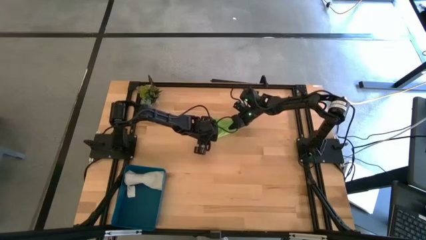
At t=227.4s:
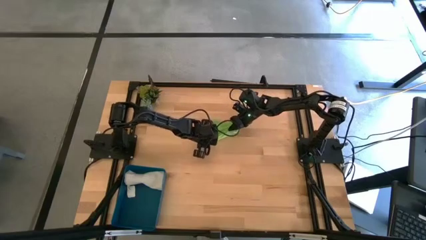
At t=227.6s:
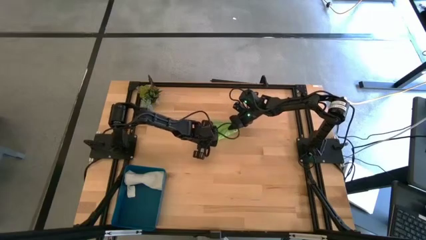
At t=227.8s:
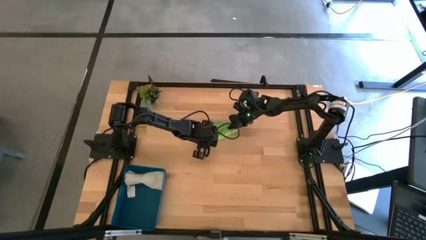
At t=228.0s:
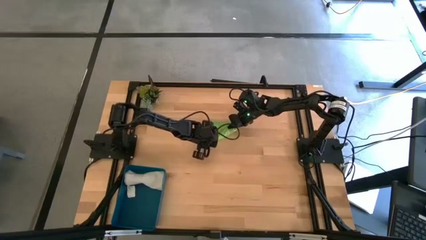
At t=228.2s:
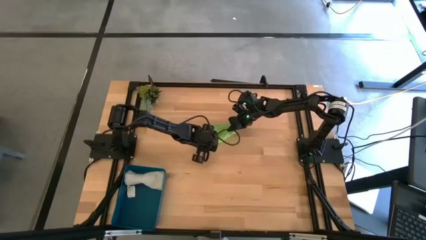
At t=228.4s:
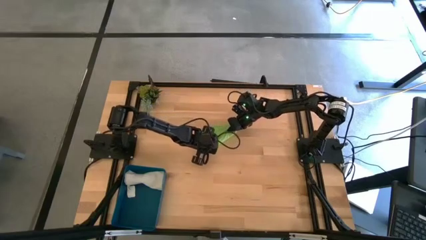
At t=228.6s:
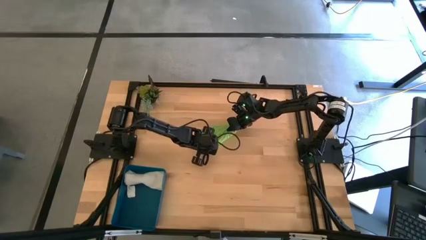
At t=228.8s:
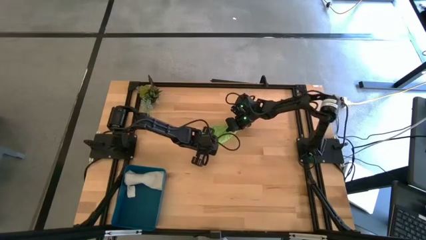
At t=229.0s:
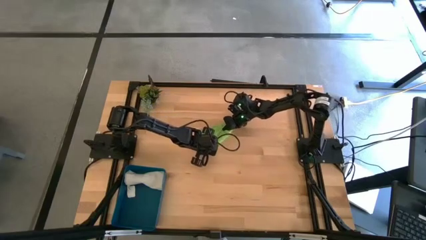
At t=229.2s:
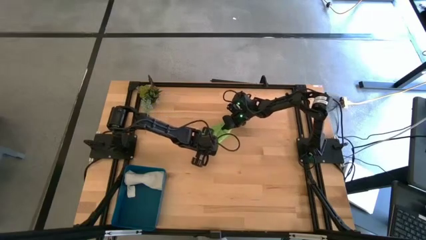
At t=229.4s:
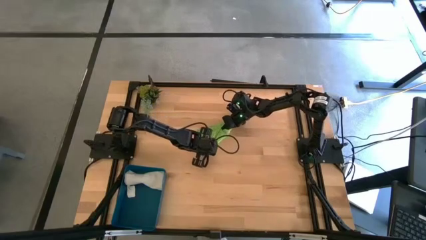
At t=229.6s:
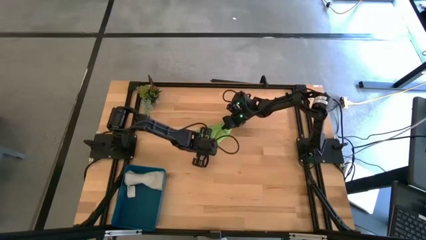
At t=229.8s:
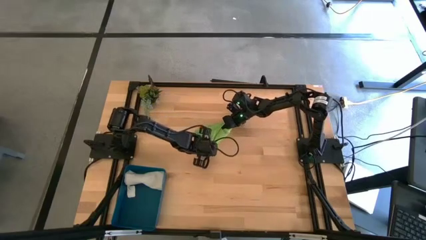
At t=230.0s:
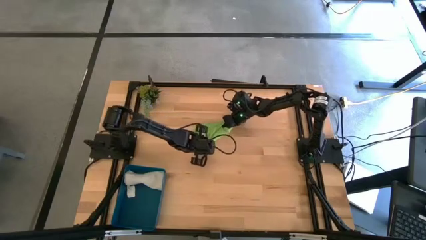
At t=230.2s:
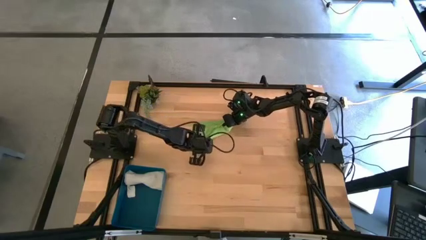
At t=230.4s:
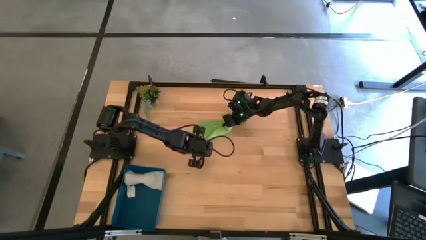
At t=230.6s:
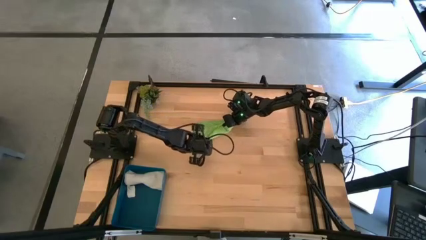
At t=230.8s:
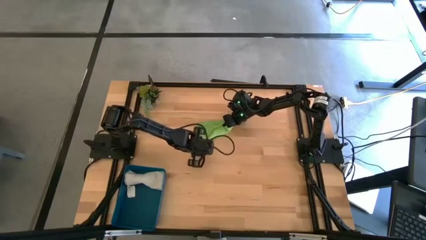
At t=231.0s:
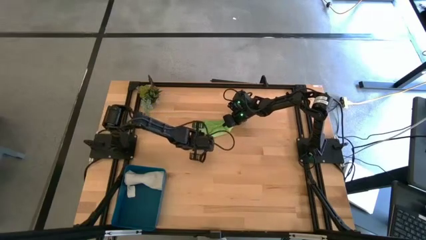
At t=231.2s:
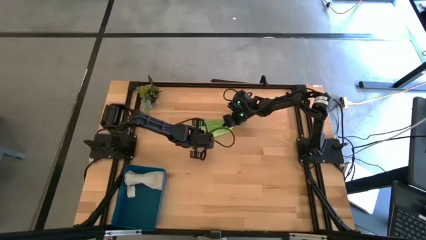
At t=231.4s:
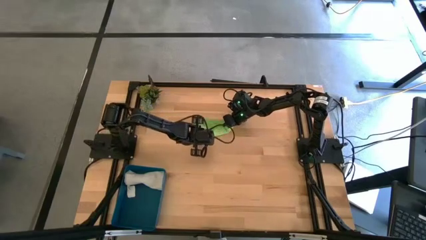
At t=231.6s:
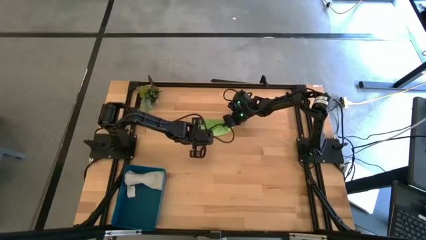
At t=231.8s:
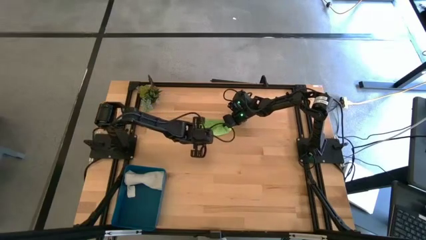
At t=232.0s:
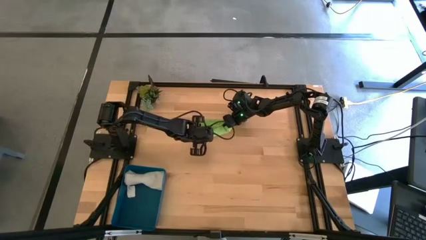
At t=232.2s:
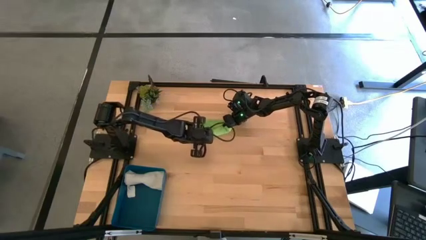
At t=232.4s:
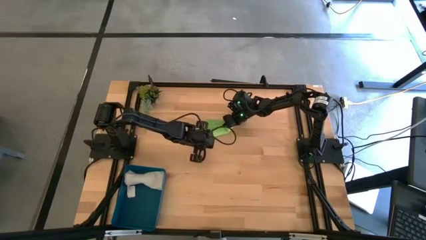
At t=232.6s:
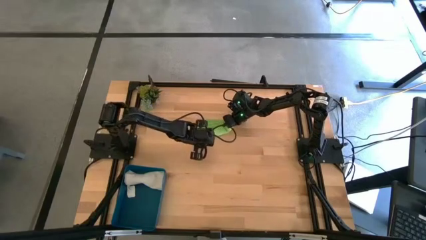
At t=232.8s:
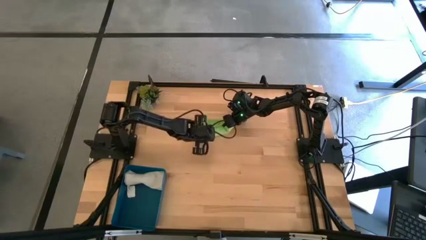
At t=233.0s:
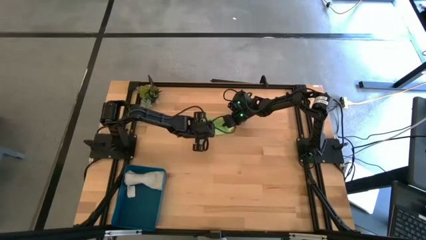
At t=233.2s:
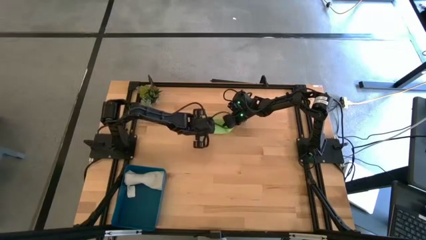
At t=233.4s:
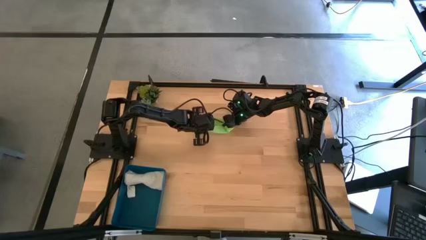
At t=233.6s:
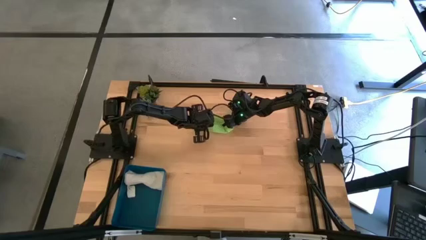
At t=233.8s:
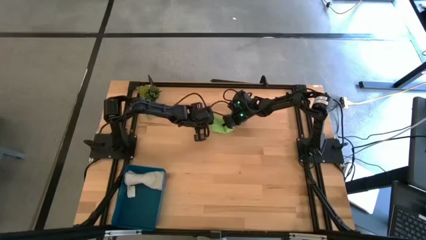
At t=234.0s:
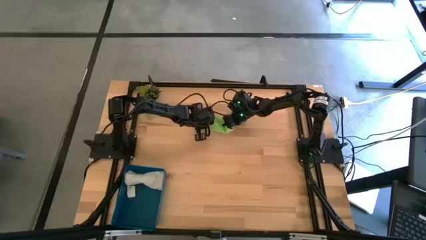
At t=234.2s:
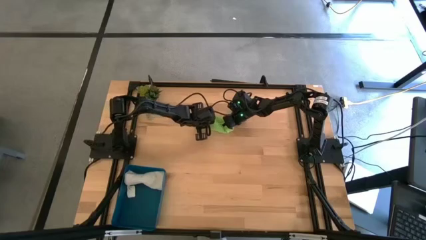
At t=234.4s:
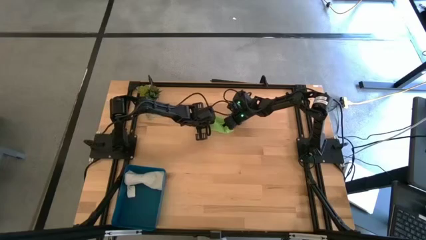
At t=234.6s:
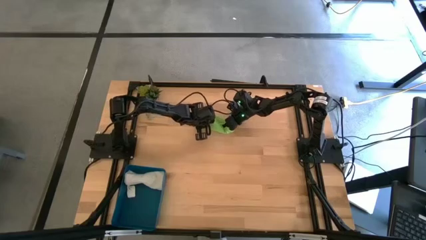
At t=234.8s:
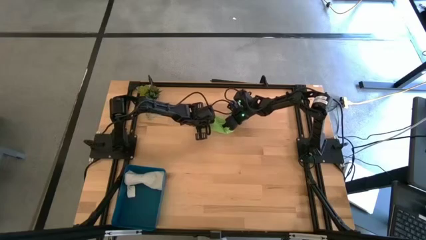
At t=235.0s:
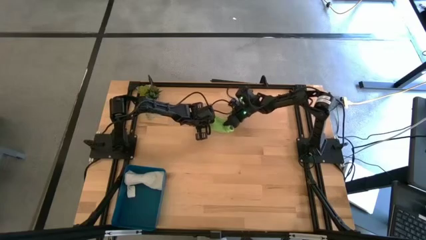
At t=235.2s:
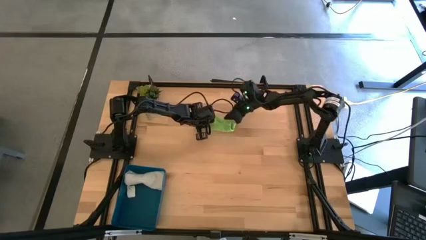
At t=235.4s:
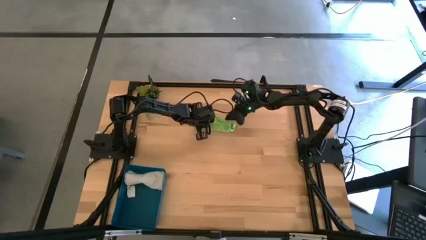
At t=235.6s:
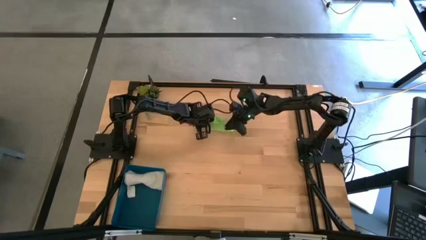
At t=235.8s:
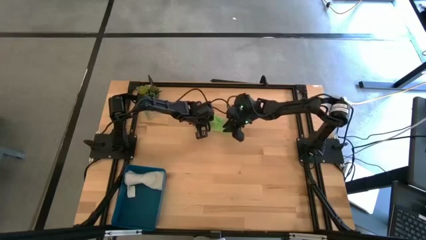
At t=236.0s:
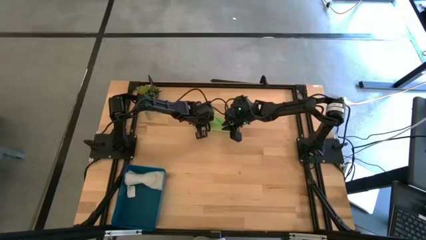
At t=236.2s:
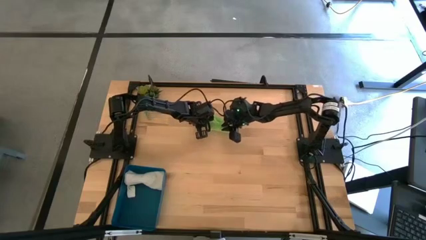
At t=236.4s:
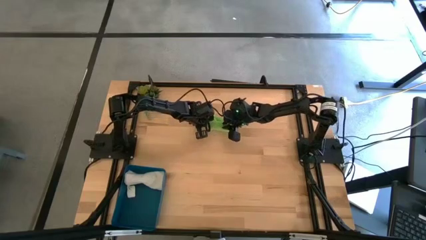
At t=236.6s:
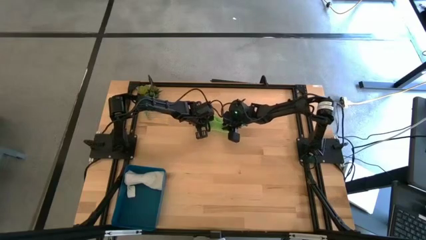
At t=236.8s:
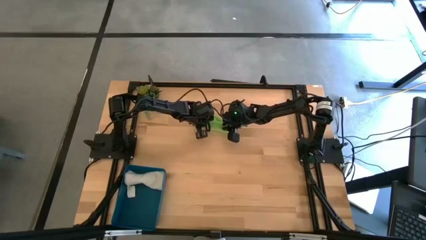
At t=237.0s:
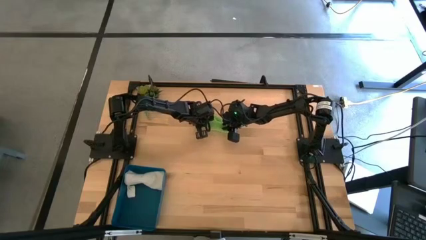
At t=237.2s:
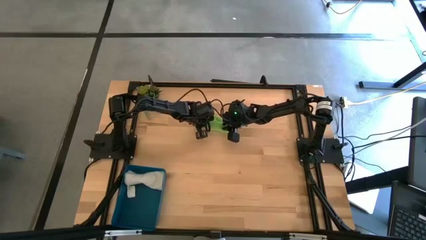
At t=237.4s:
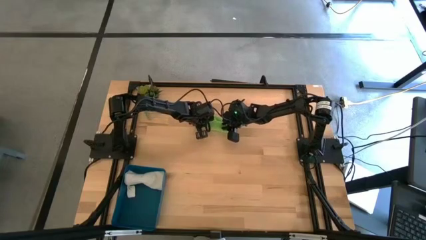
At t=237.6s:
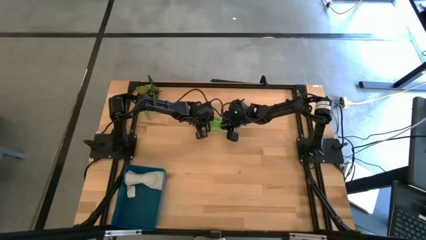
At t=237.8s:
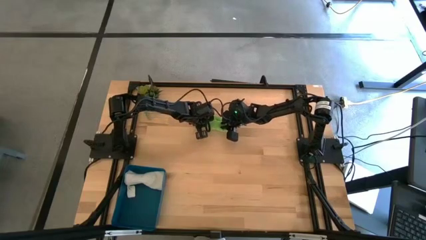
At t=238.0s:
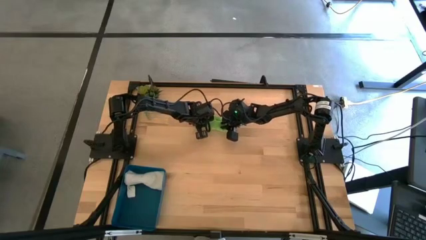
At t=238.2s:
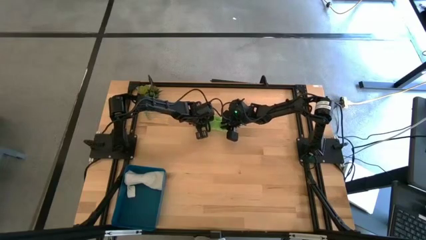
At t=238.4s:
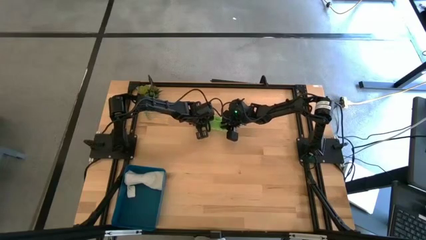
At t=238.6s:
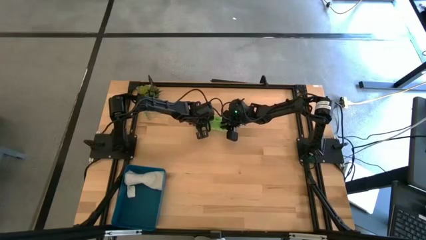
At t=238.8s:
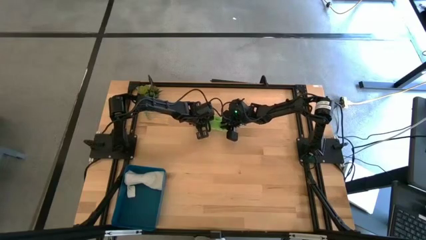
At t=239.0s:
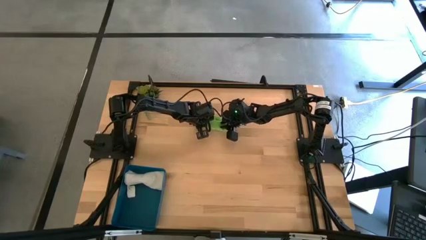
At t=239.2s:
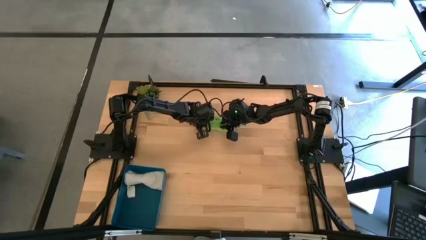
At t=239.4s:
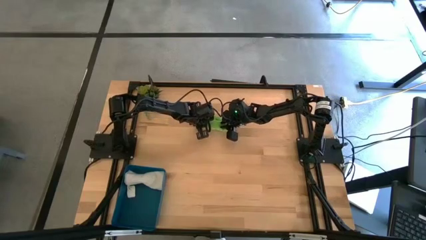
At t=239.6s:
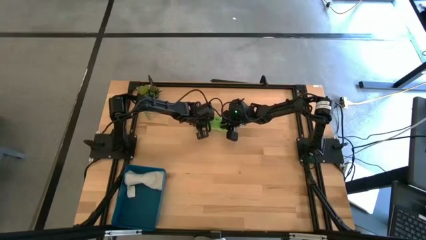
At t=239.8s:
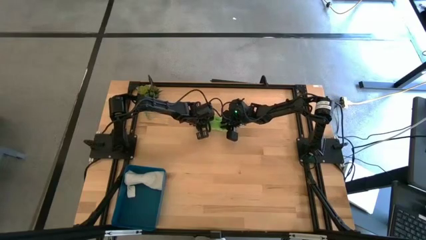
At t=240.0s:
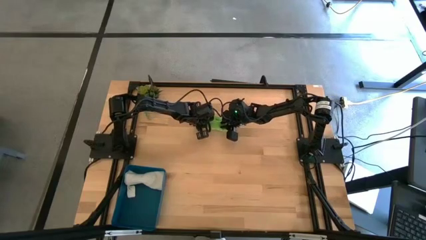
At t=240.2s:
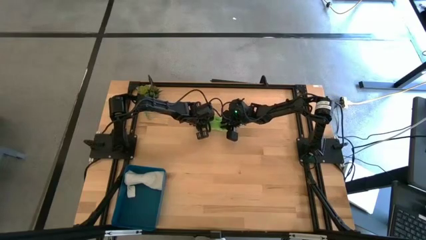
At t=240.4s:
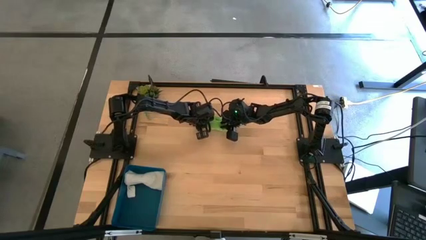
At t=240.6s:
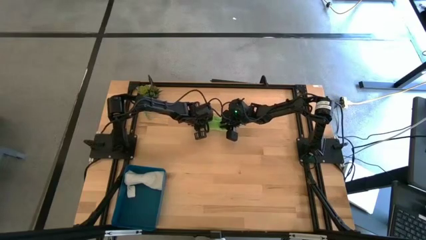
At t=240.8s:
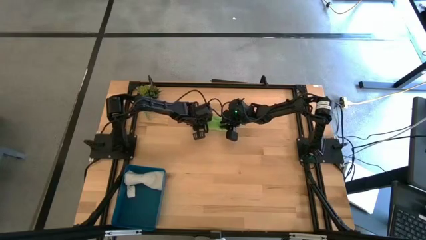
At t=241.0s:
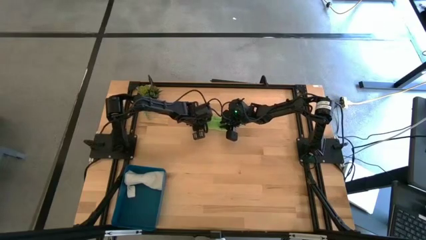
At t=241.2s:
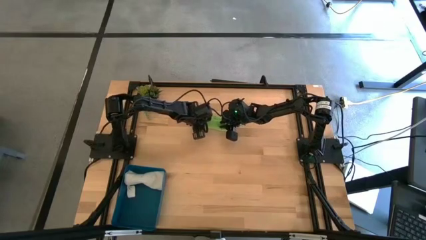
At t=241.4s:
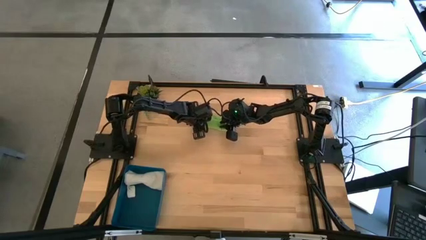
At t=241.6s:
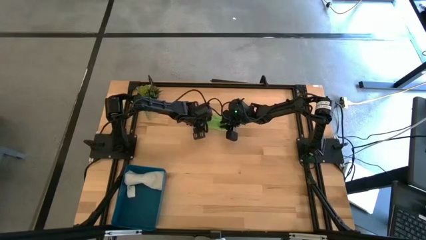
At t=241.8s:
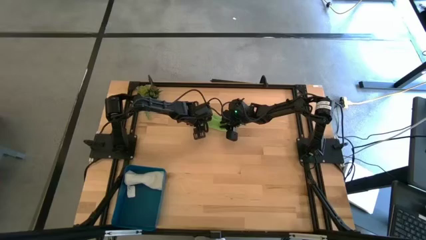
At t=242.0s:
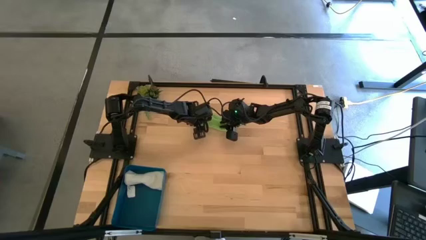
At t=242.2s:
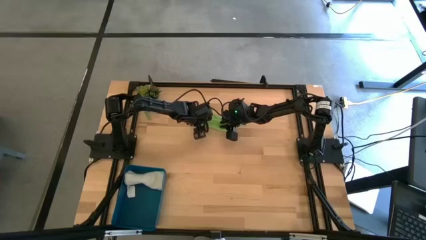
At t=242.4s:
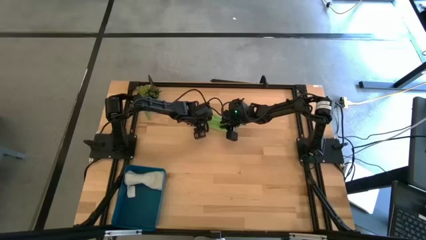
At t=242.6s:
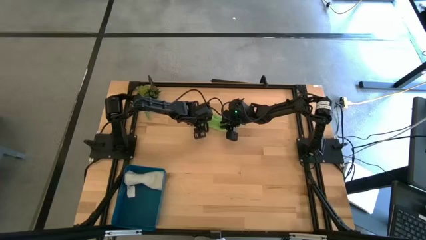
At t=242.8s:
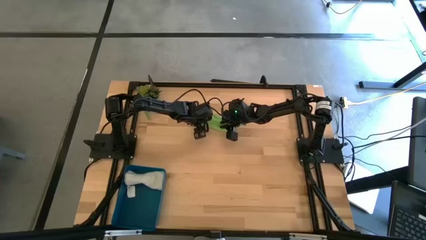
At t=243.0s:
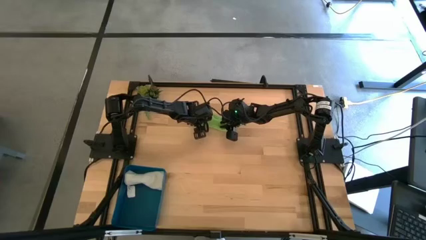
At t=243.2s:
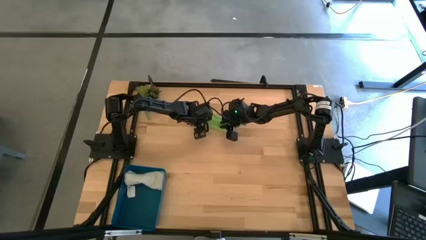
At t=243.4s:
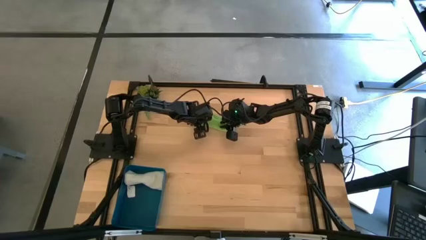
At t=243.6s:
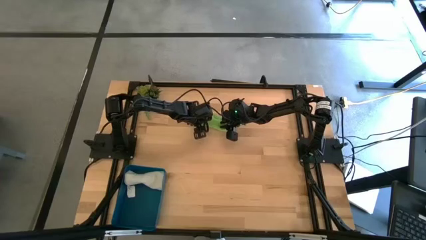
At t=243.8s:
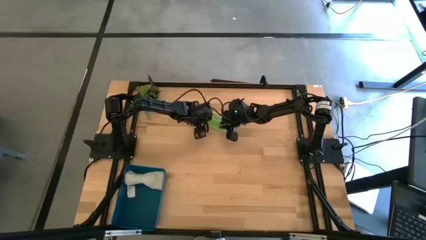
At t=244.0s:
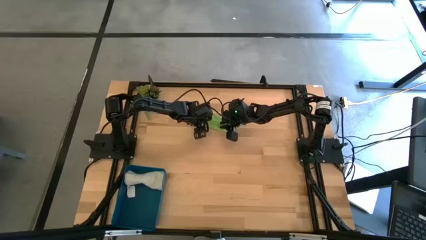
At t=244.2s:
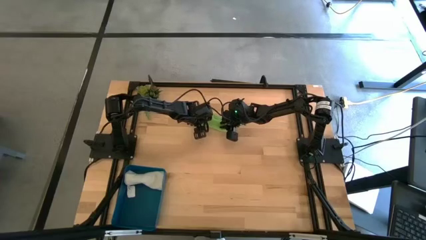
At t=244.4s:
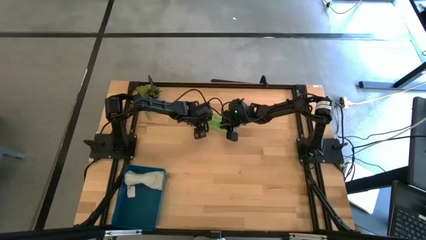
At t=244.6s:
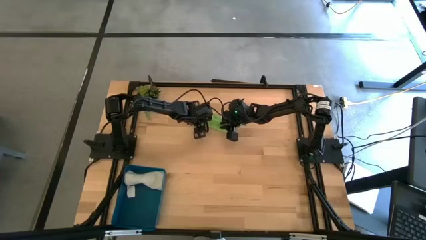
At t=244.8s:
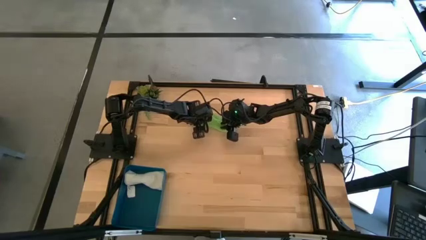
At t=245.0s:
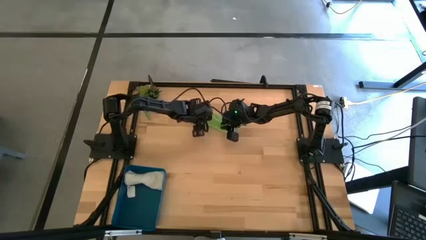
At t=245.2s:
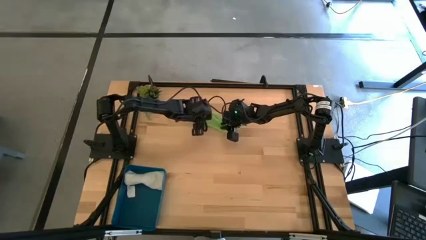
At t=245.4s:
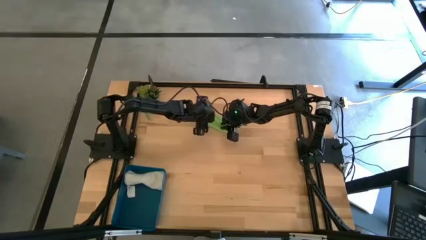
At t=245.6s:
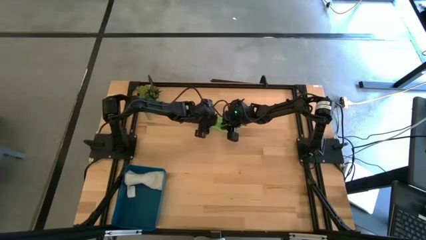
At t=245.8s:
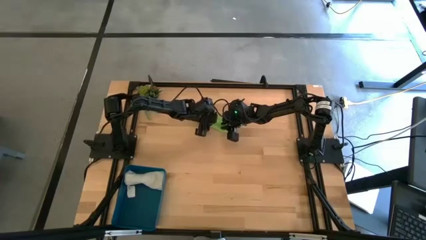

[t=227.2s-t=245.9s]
Task: Roll microfiber towels into tight, uniform cylinder then place into a basket
Roll the green towel
